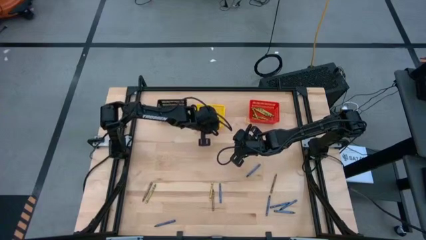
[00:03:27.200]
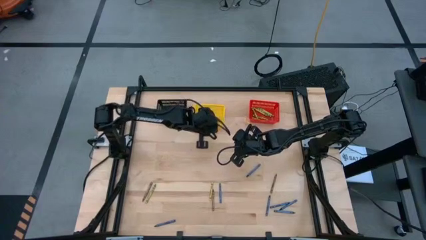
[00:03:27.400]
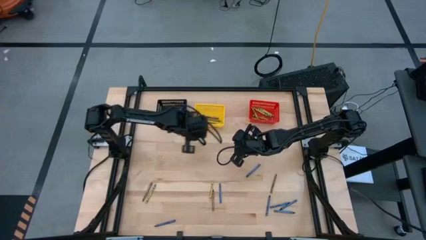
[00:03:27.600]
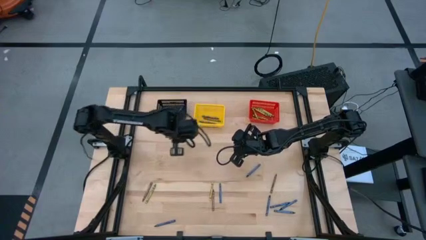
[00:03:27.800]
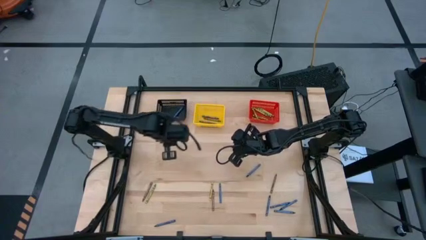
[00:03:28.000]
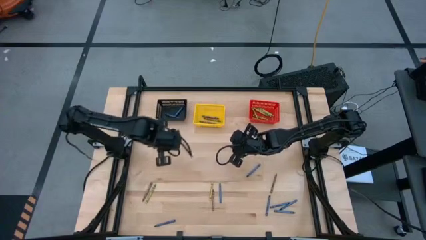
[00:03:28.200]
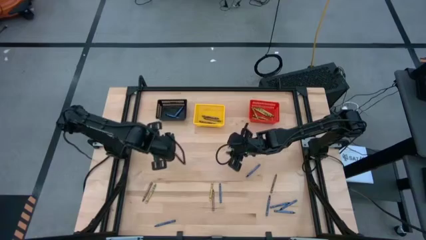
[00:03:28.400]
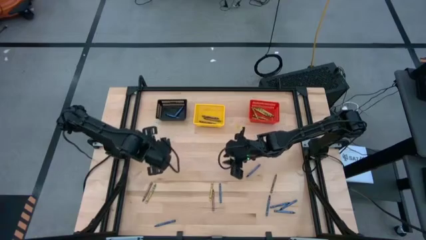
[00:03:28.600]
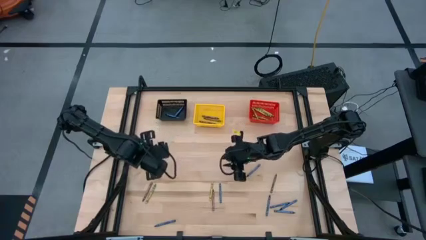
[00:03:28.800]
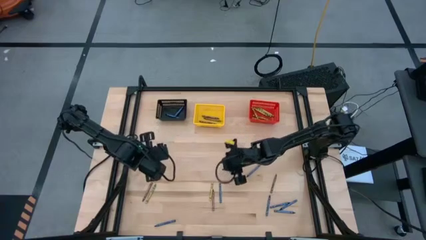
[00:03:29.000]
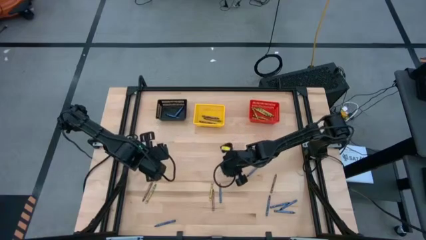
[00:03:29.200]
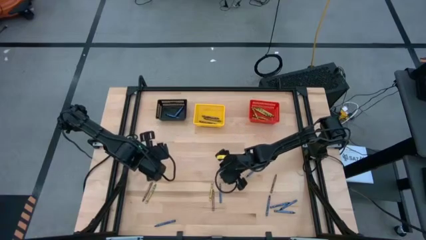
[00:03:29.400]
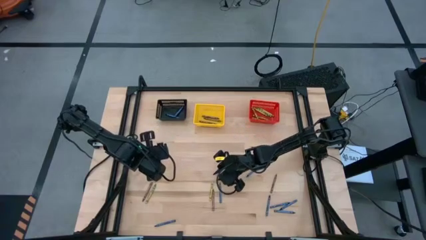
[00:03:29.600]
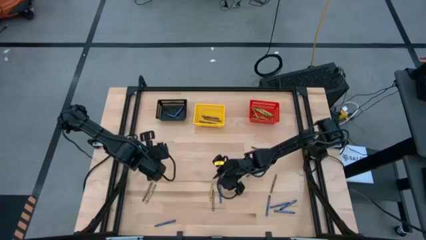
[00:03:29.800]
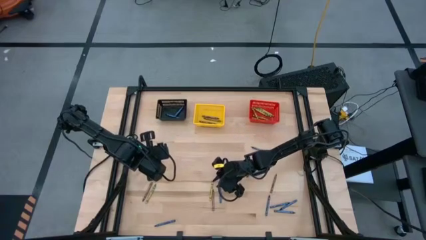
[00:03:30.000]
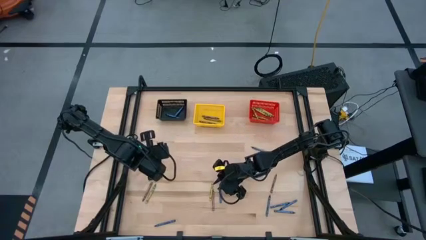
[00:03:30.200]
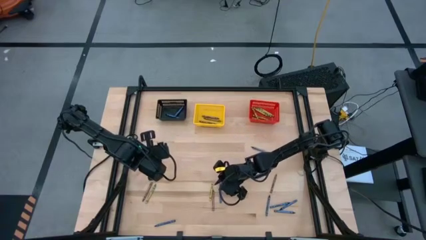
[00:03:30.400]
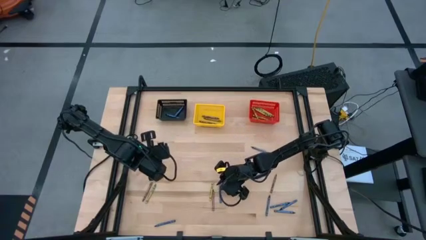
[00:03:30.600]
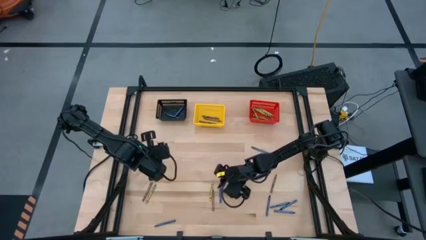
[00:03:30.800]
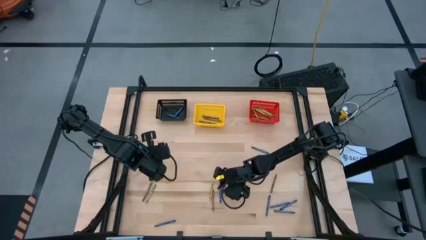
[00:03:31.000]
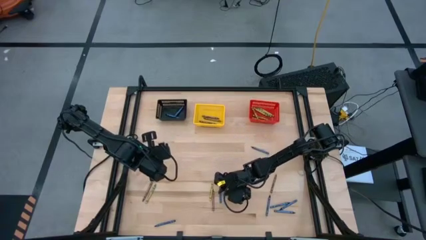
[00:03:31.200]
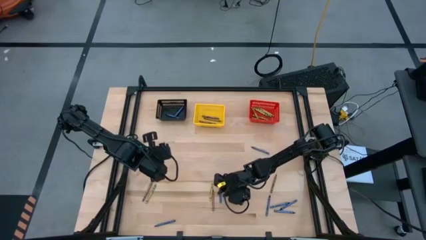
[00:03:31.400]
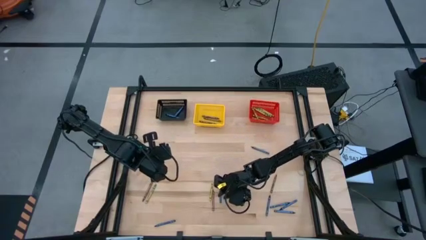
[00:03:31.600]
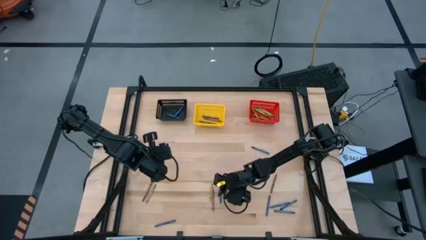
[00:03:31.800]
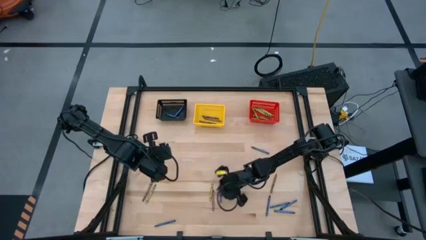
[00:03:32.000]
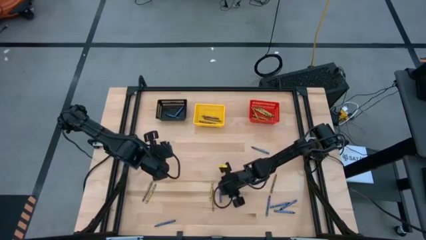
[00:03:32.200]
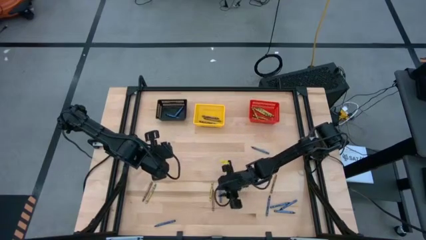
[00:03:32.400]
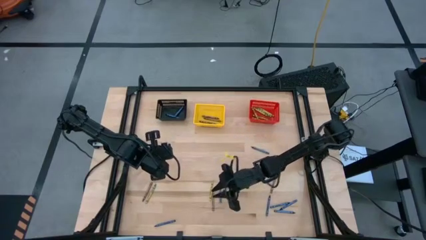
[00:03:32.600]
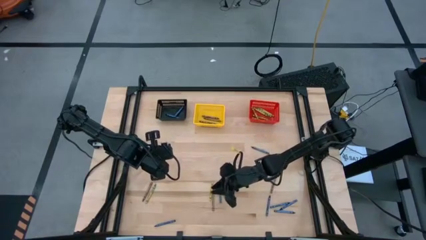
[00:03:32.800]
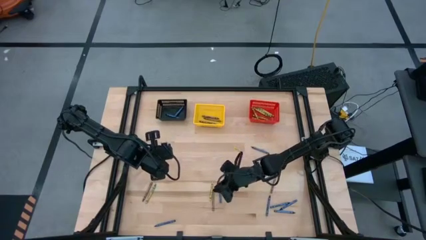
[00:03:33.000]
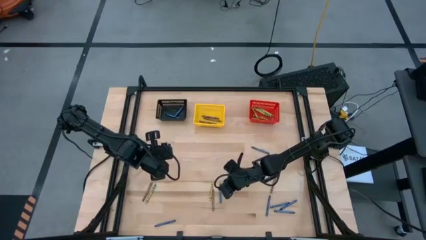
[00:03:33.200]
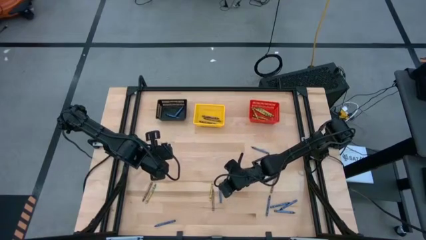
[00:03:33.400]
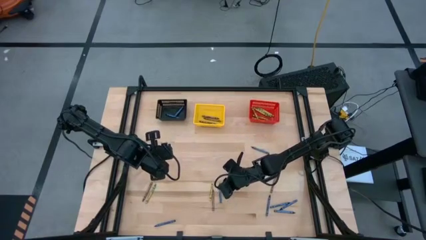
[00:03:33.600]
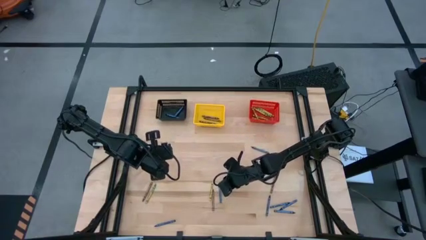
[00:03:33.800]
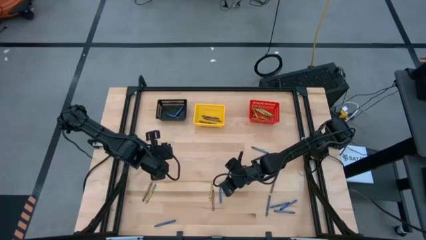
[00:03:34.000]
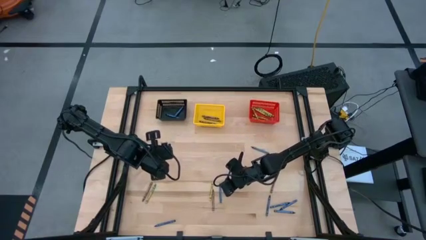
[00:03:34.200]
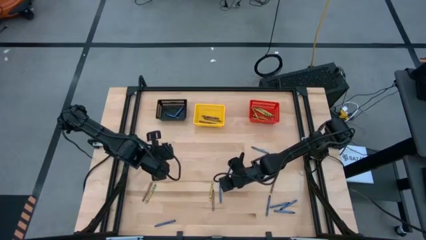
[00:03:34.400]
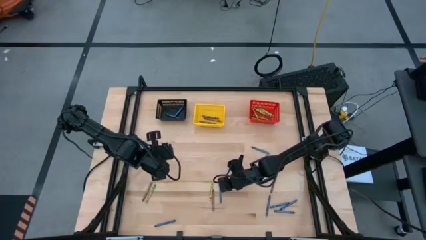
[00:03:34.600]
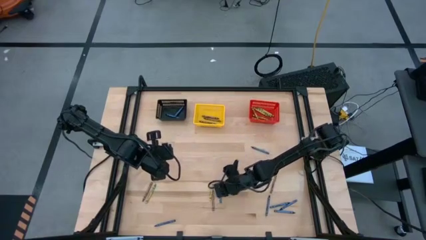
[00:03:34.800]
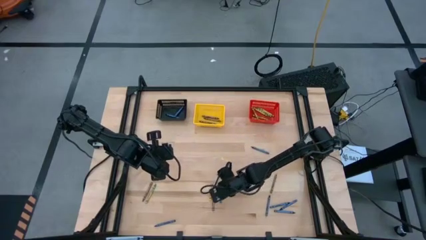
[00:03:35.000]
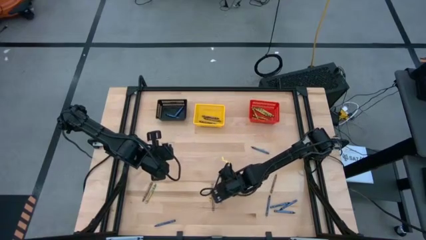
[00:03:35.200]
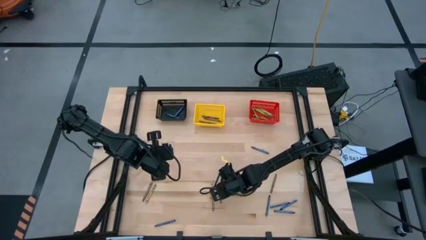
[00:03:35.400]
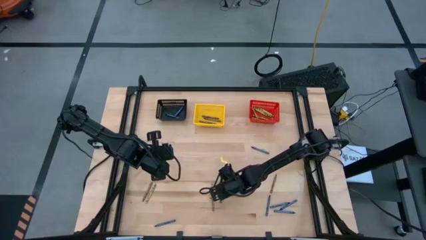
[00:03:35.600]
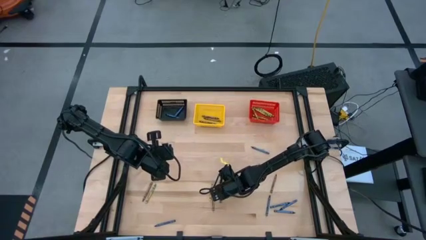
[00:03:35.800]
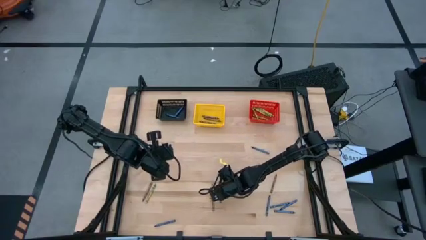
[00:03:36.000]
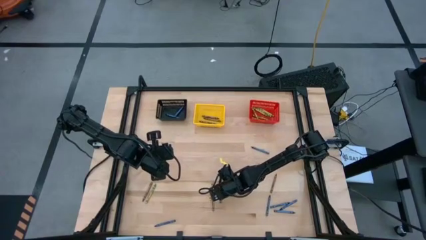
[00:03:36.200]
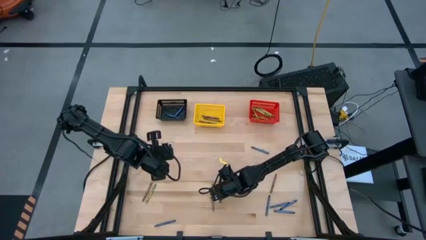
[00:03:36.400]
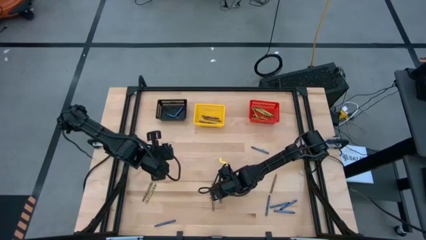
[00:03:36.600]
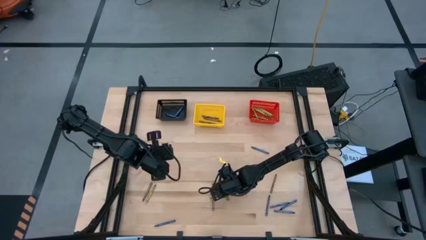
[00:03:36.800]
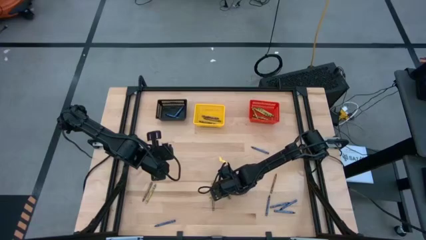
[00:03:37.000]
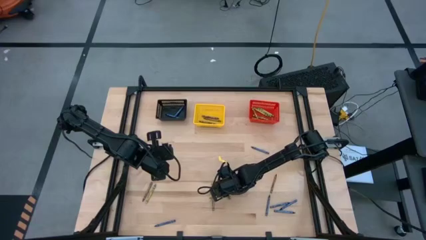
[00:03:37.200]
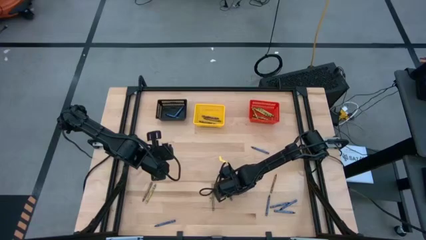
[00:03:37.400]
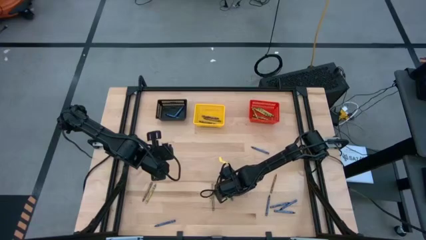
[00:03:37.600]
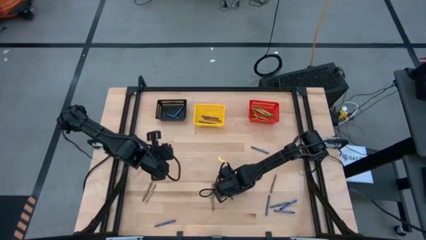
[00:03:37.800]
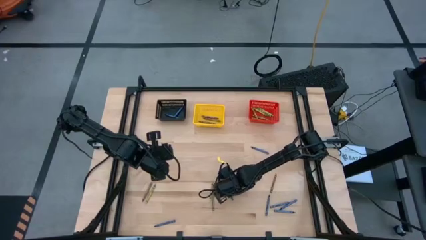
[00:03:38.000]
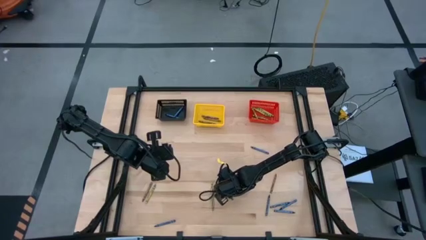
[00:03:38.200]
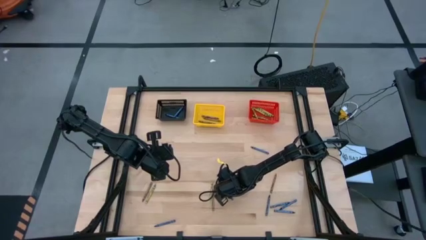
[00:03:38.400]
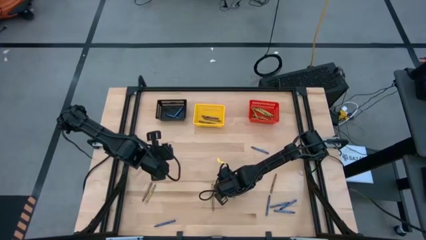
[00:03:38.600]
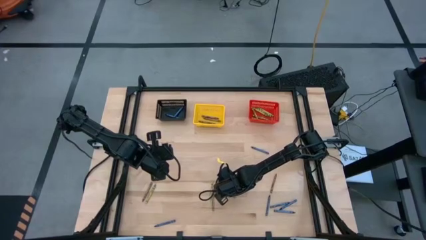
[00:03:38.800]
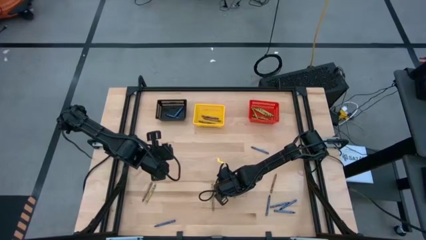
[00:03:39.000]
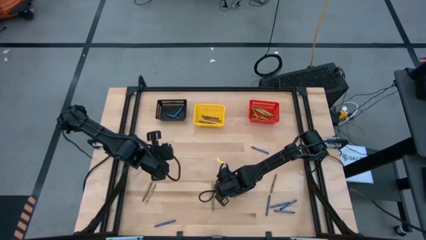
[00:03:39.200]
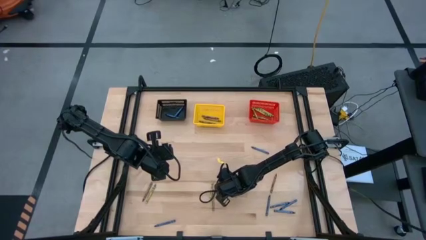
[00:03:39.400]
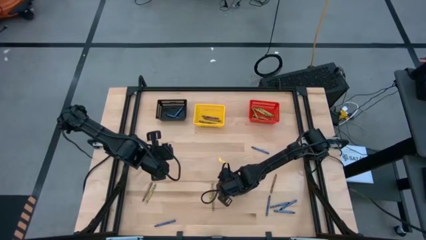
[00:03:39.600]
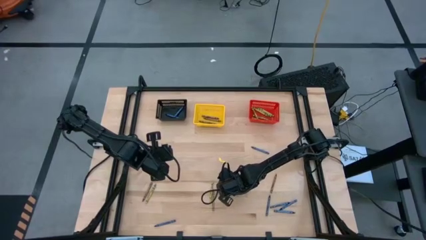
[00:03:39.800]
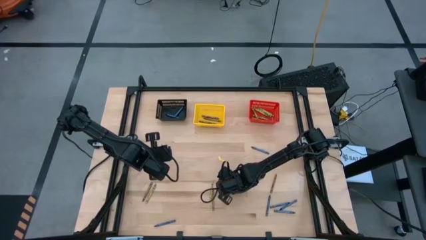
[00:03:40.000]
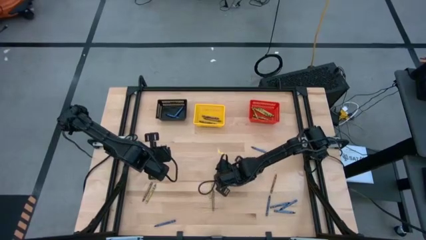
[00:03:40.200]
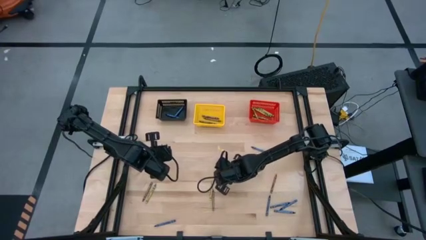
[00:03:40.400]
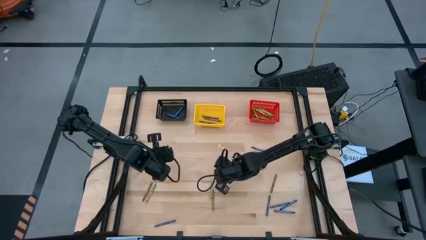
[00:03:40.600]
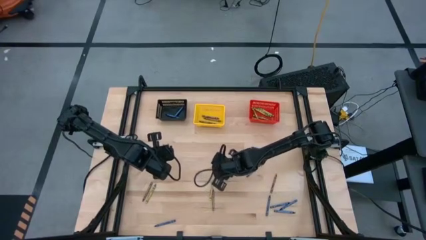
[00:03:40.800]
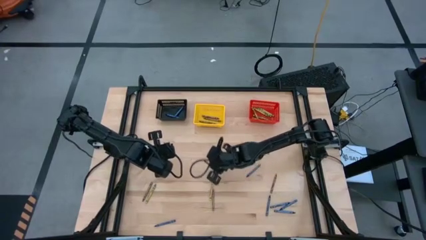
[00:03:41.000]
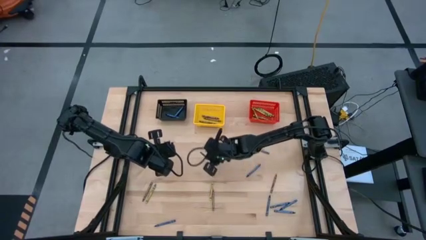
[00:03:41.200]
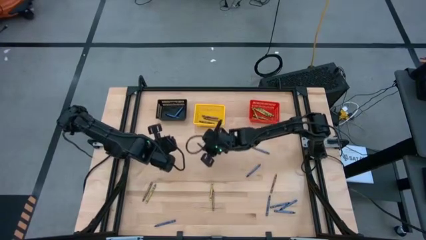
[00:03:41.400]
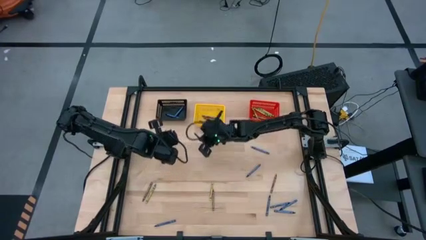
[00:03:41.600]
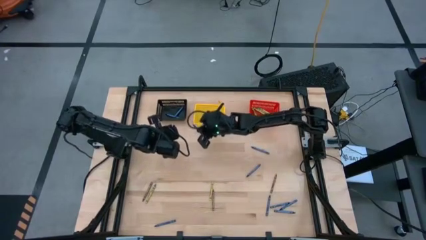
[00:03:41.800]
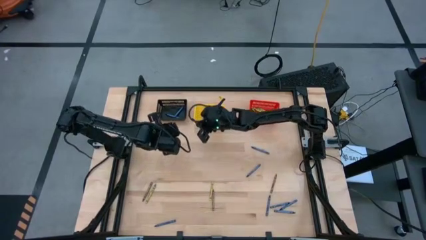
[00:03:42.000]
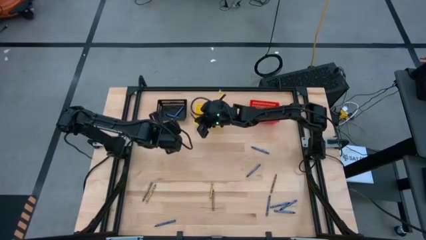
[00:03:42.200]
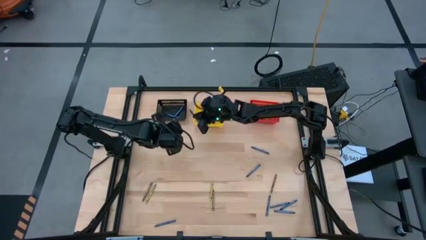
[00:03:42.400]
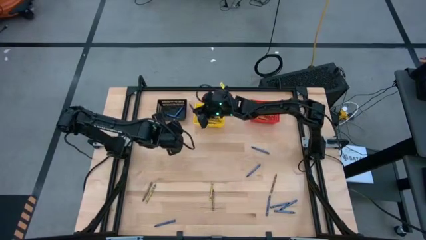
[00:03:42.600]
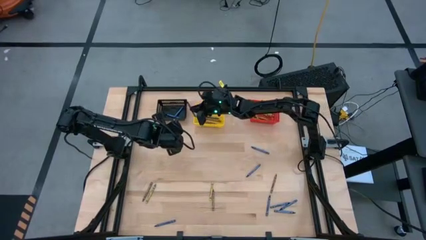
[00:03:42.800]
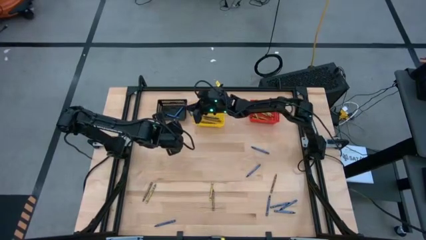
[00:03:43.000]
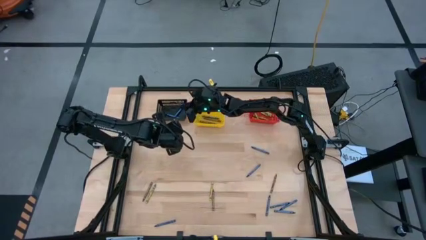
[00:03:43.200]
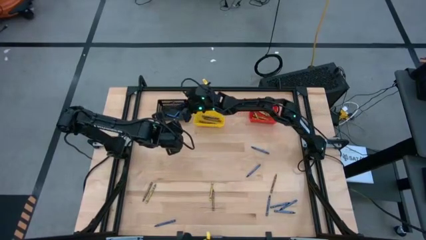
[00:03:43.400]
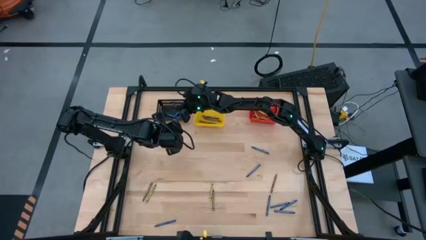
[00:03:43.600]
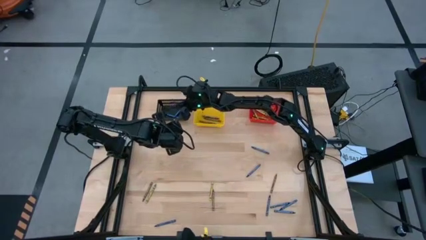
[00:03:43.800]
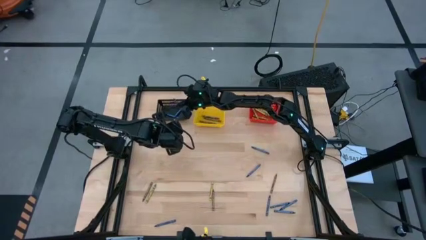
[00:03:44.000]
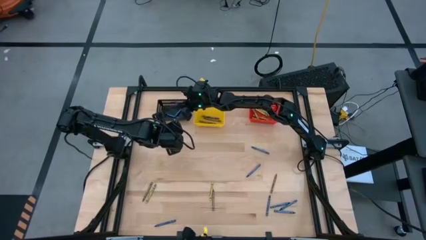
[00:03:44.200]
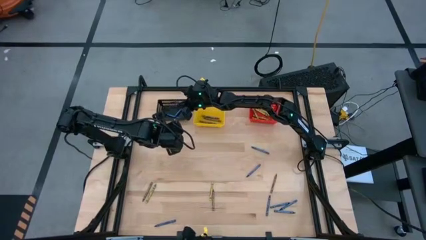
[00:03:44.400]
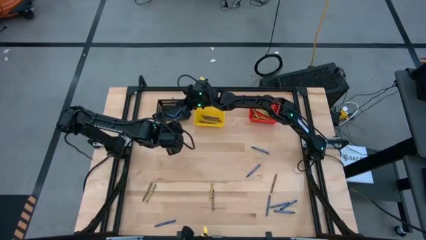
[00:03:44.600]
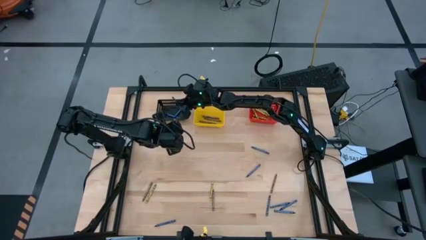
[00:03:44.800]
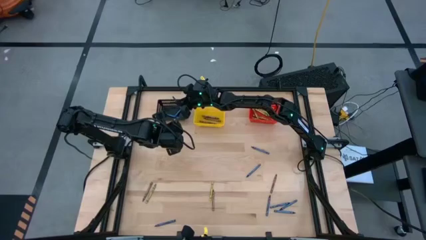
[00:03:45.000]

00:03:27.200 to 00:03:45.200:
Task: Sort crayons
Put the blue crayon into the black bin
